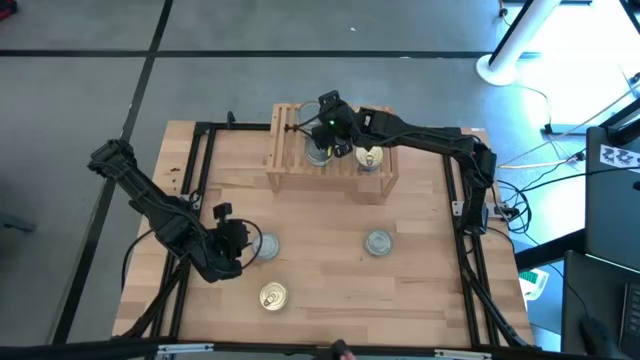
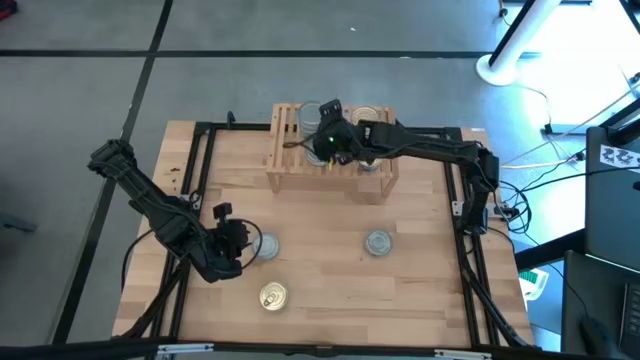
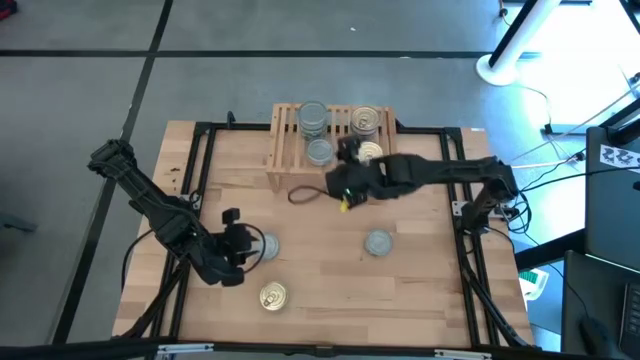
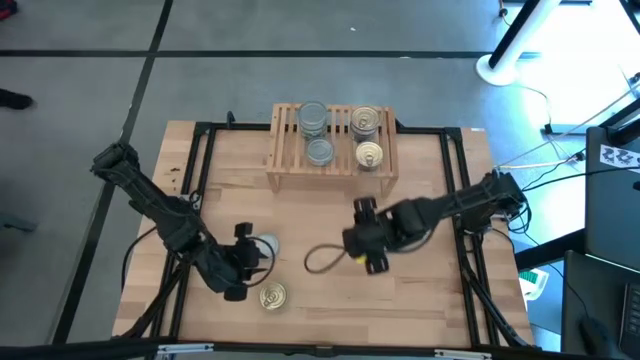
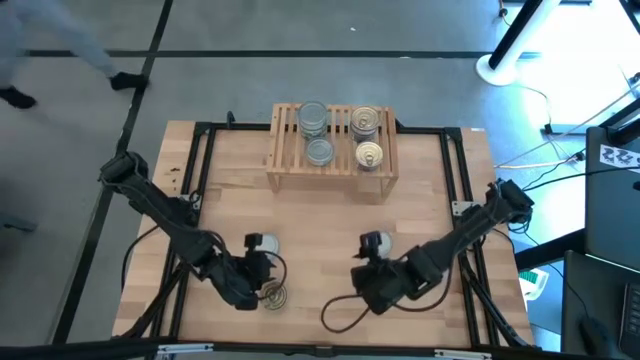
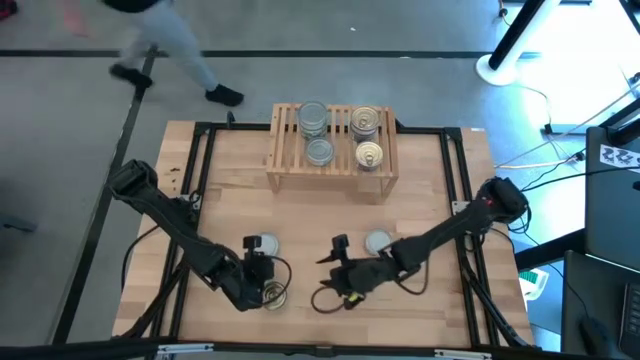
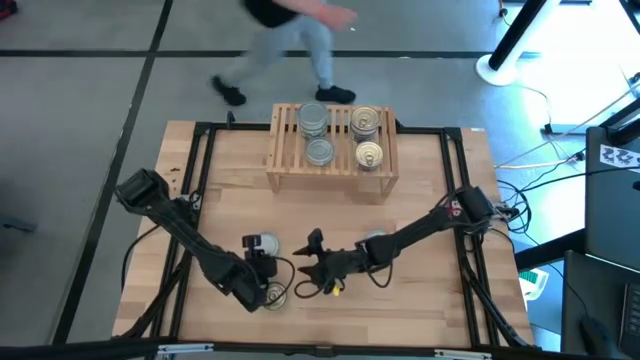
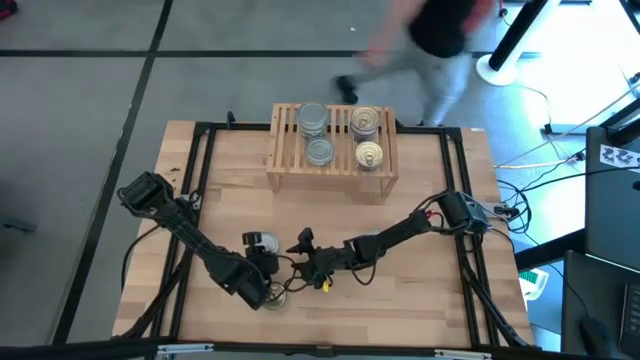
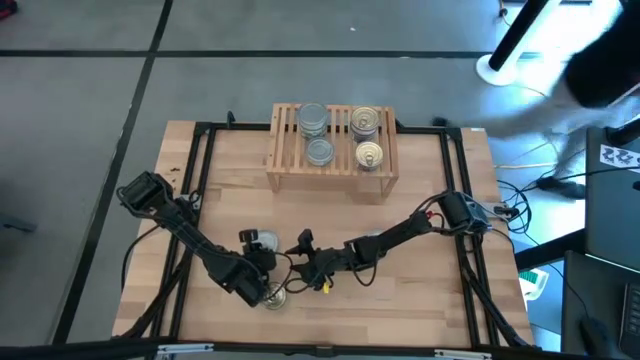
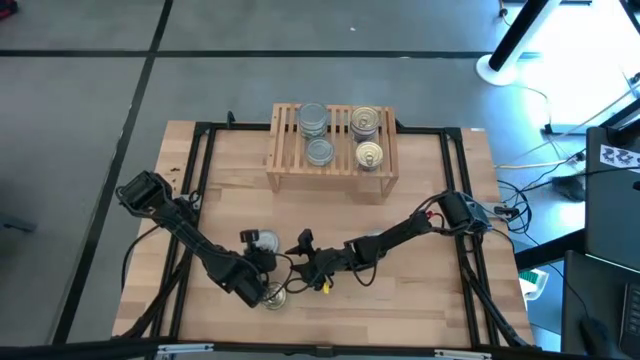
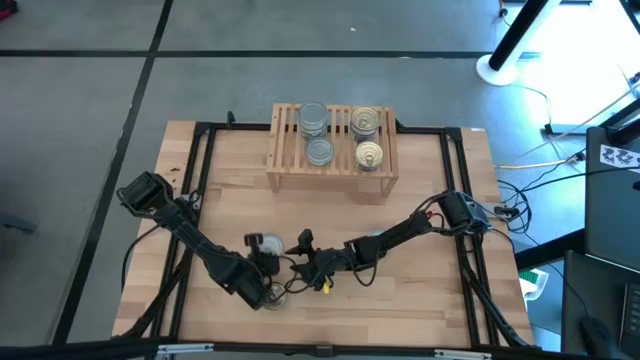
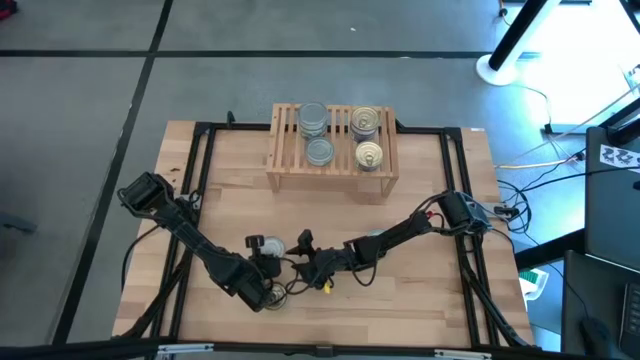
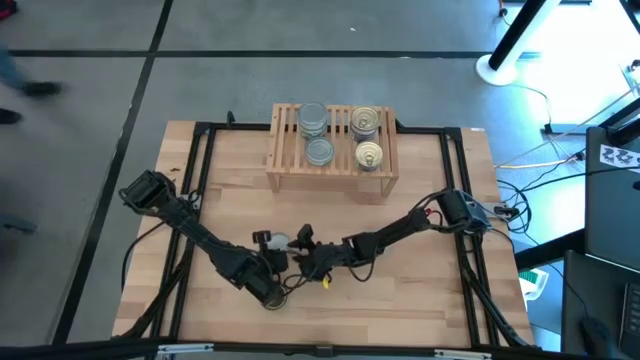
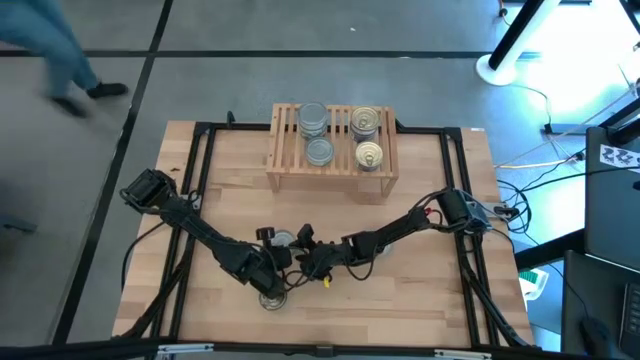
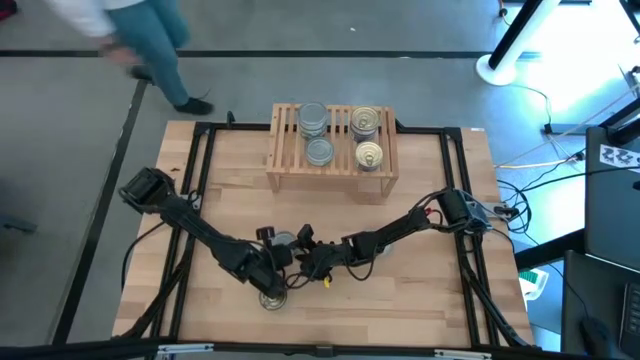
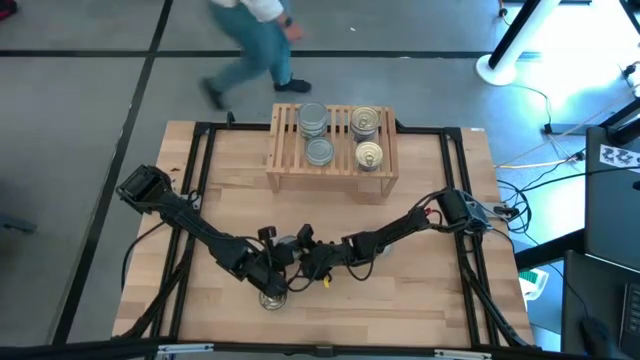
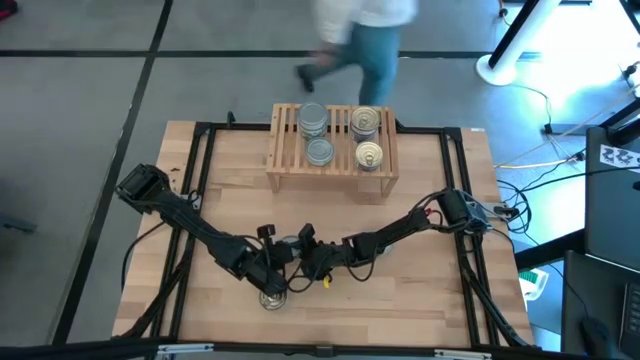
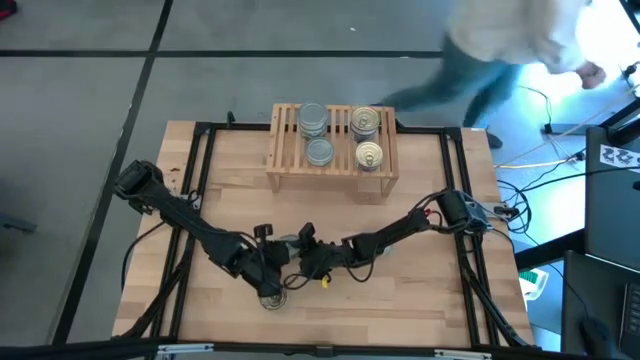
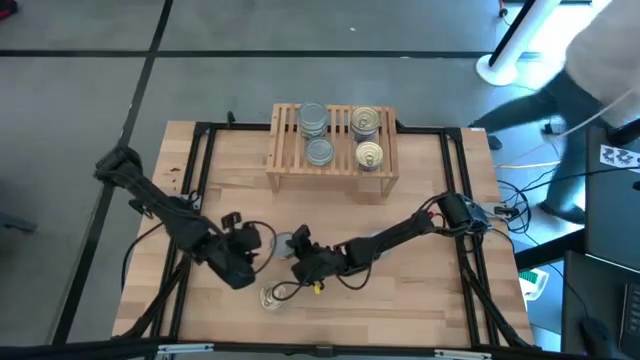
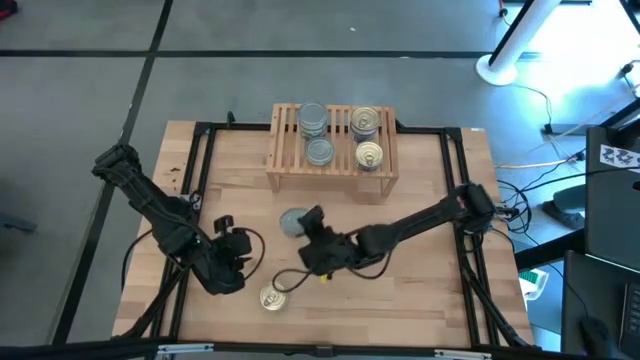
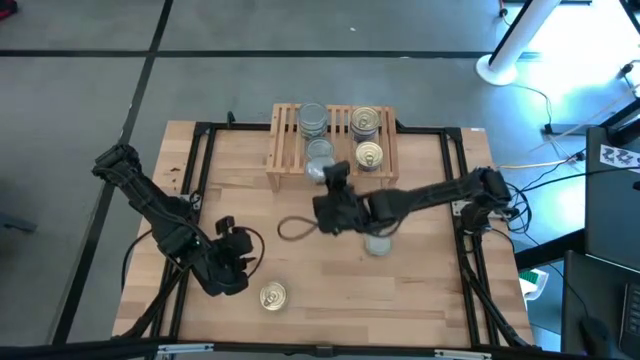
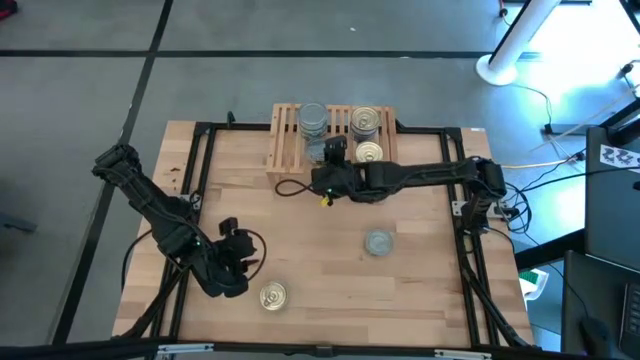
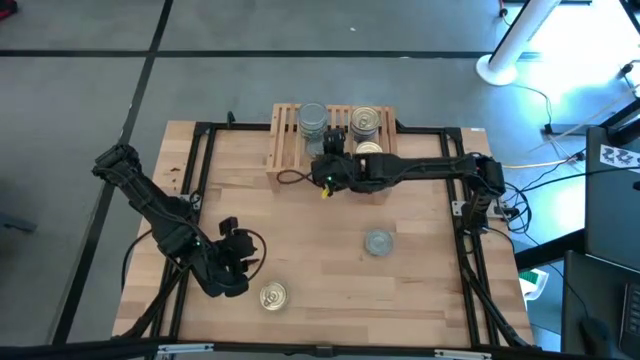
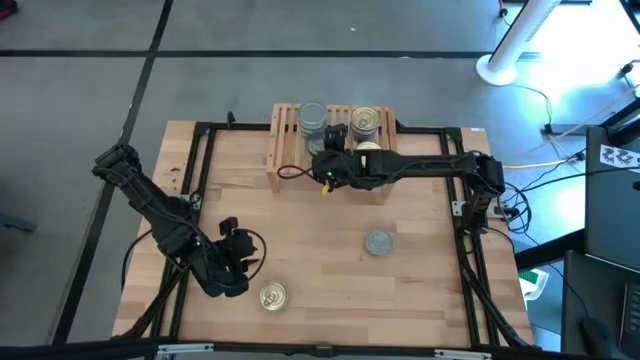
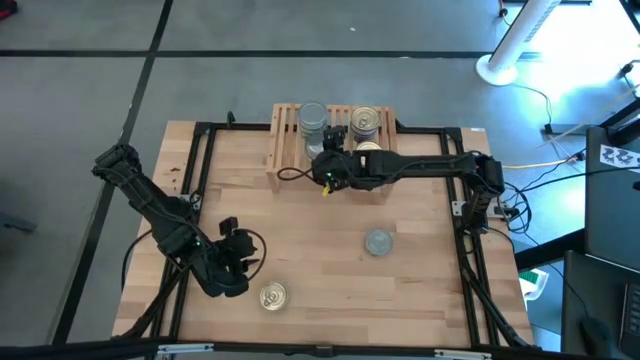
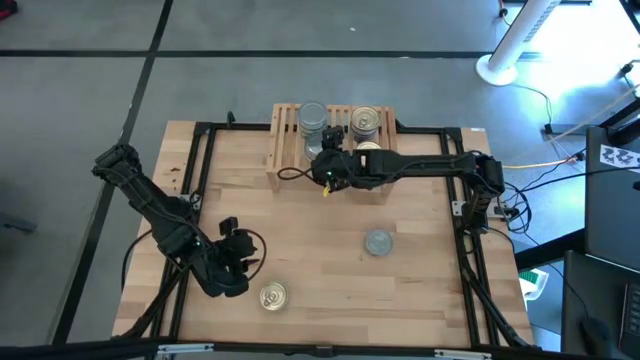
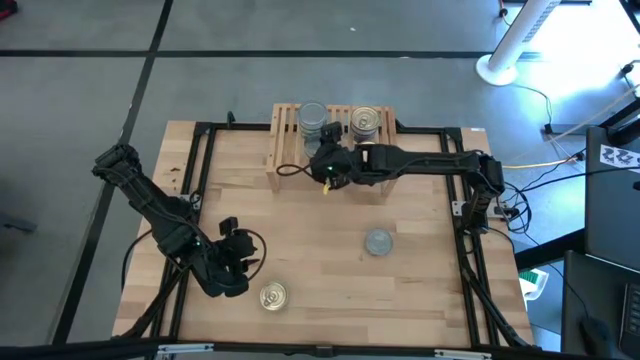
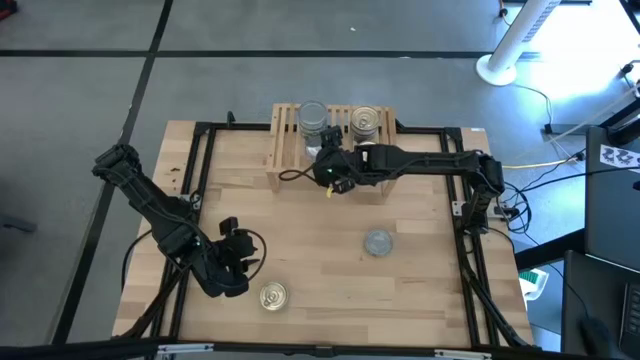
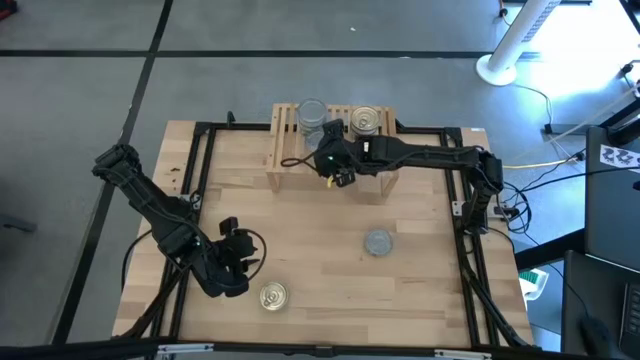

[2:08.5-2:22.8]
Task: Stack canned seafood by type on shelf
Stack the green white tuna can on top of the green white tuna can on the shelf

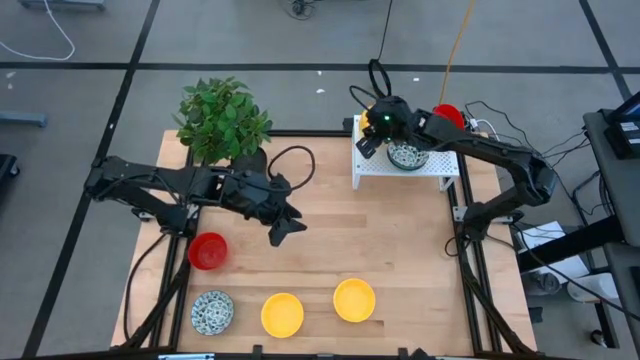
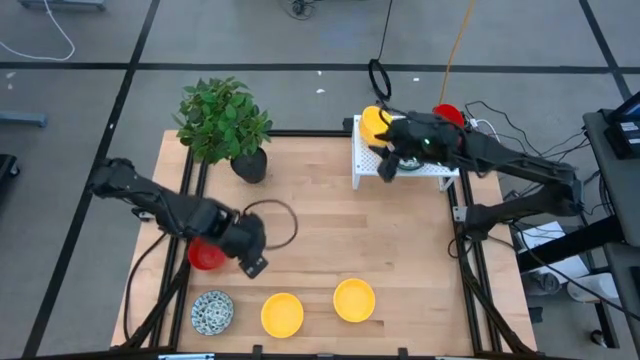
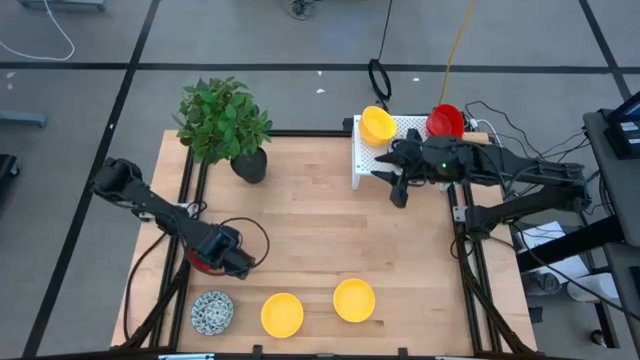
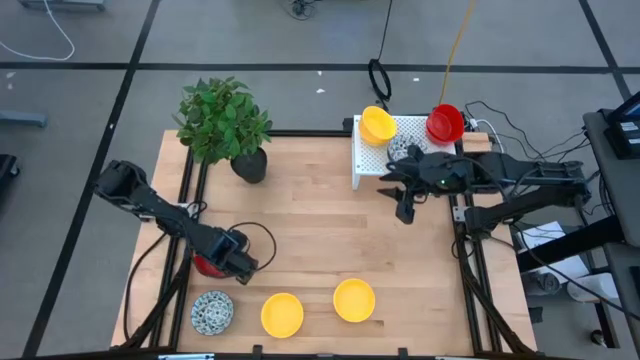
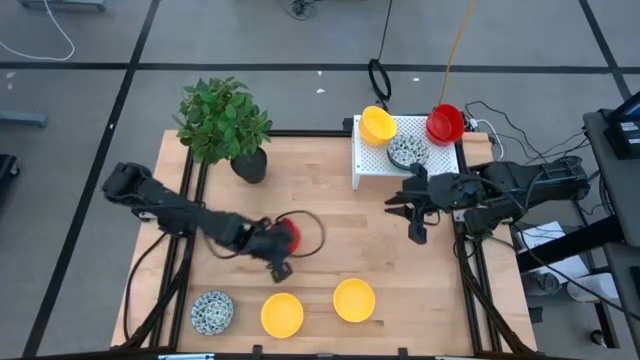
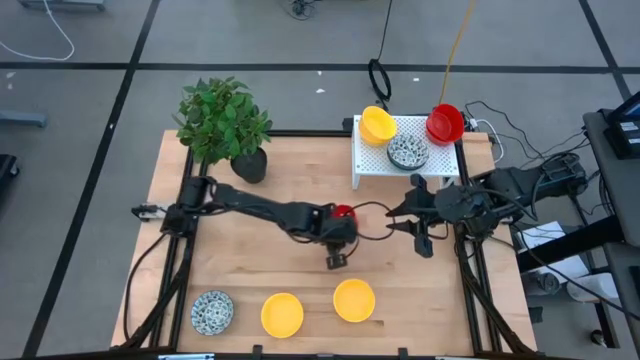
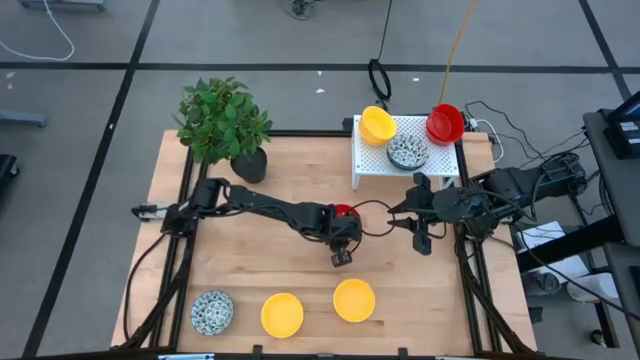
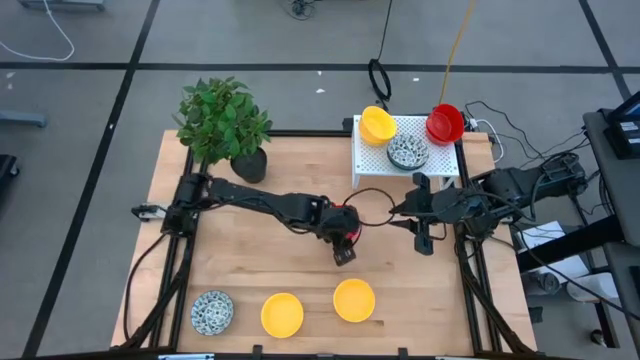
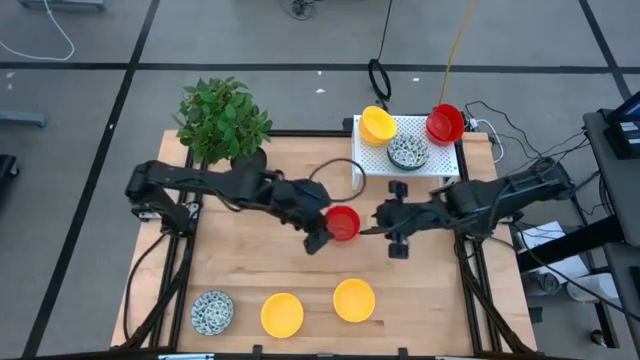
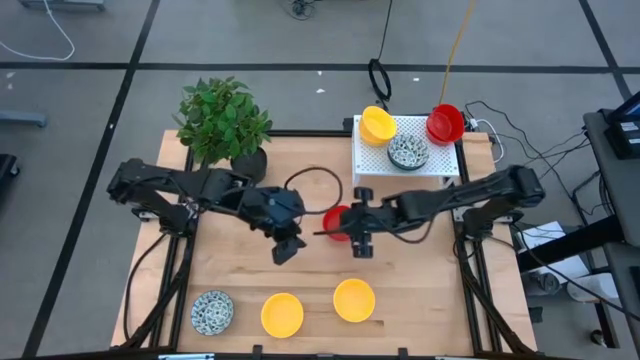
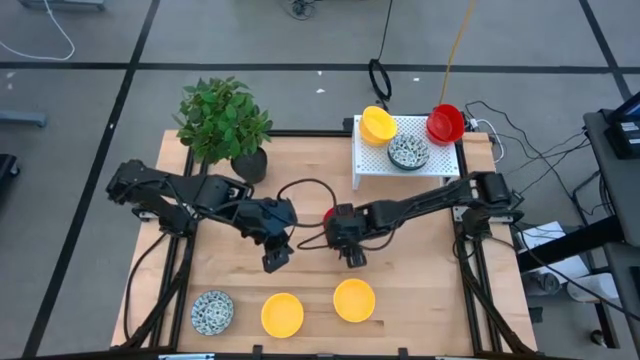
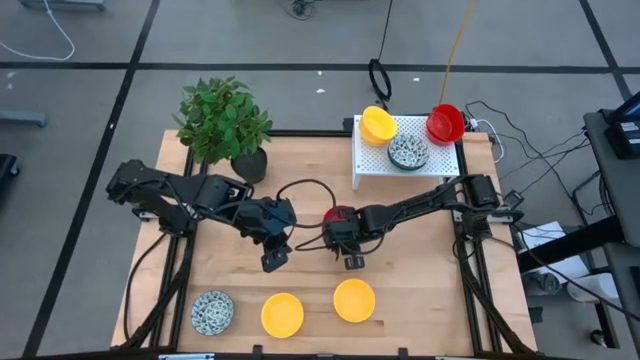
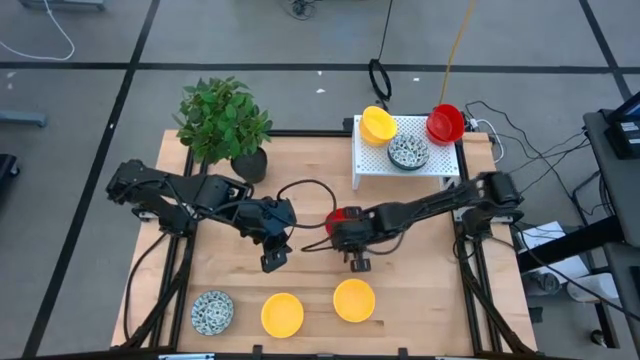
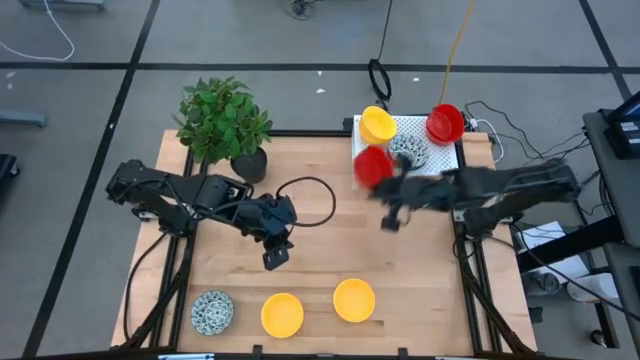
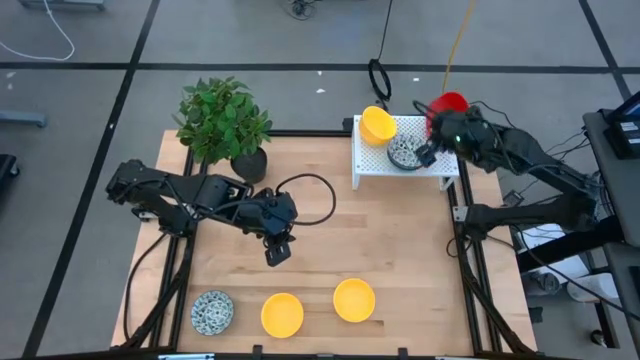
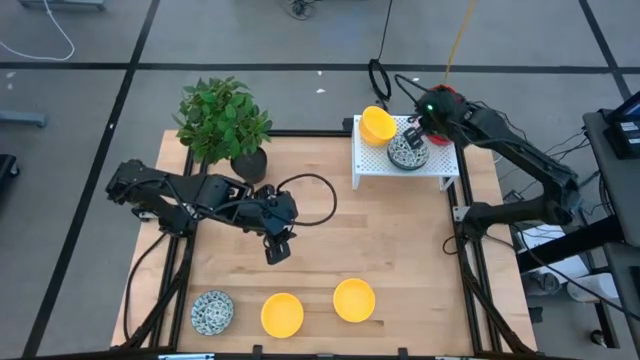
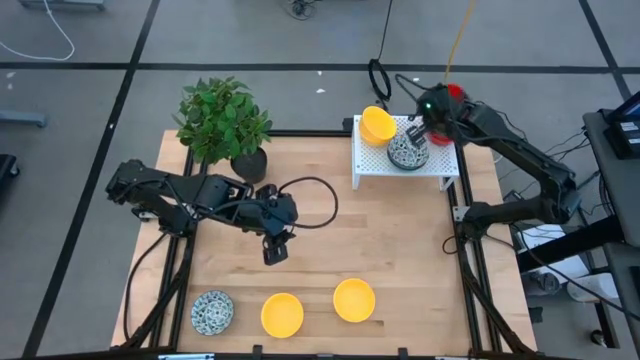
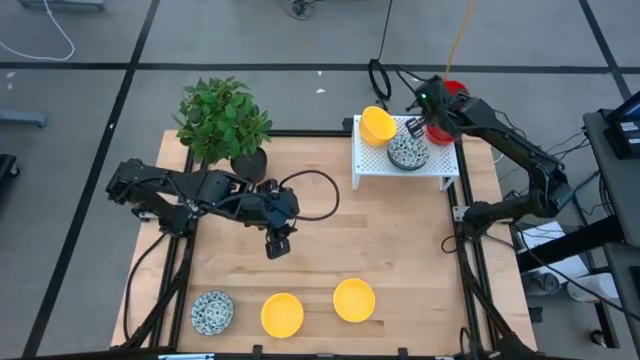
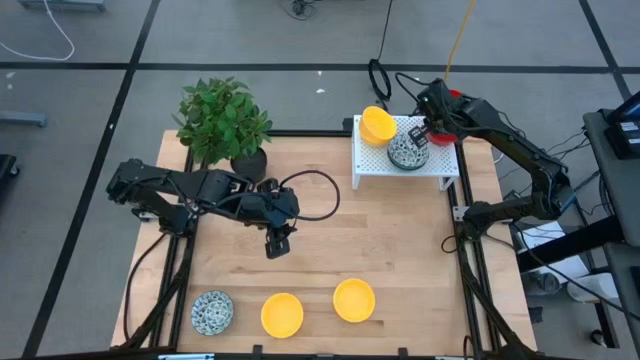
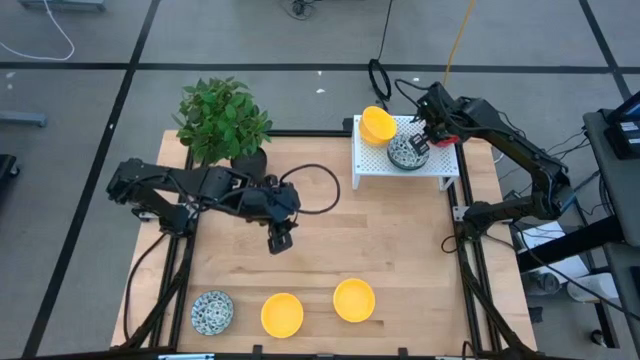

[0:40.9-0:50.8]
Task: Pick & Place Mini bowls
Stack the red bowl on top of the red bowls on the shelf
